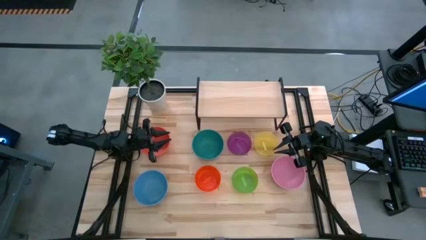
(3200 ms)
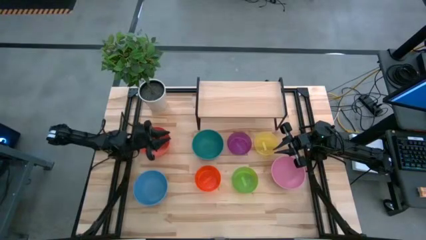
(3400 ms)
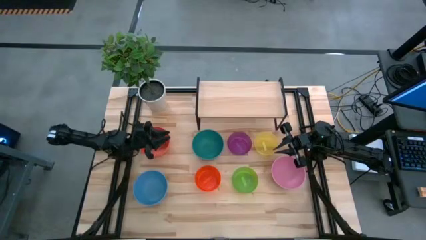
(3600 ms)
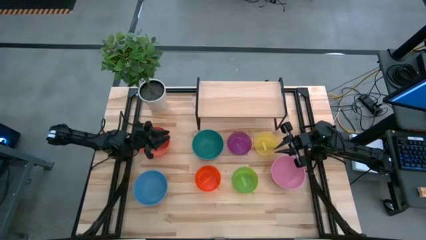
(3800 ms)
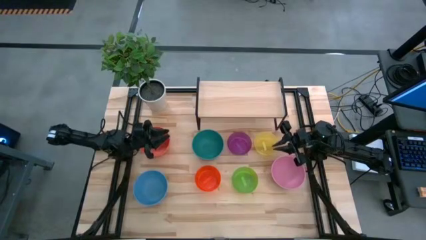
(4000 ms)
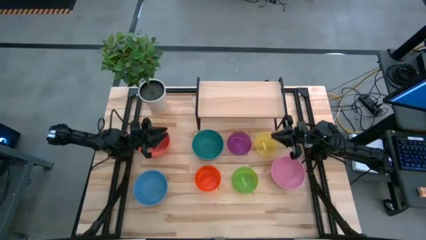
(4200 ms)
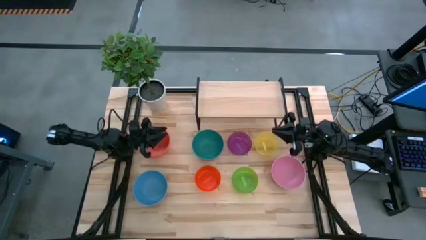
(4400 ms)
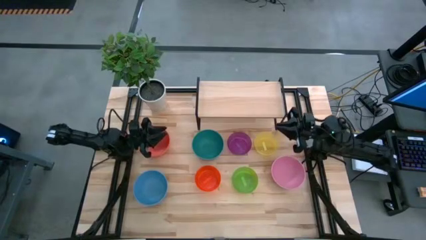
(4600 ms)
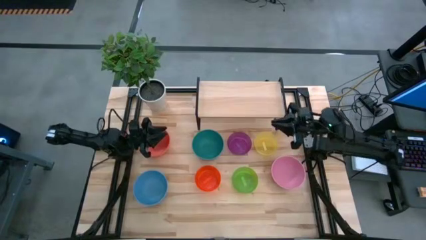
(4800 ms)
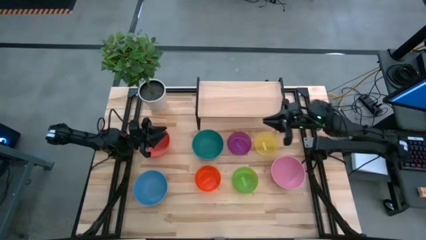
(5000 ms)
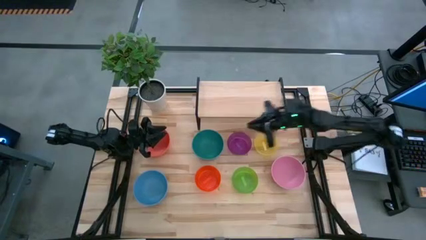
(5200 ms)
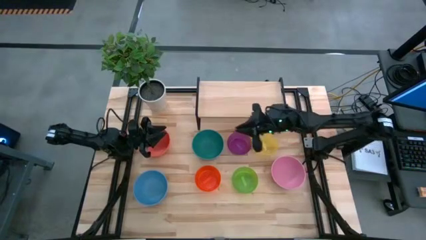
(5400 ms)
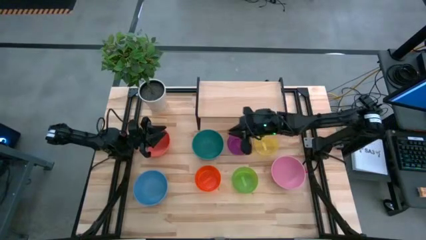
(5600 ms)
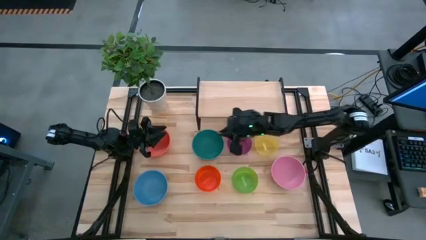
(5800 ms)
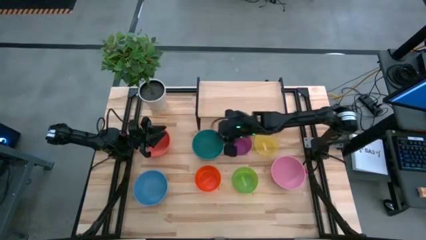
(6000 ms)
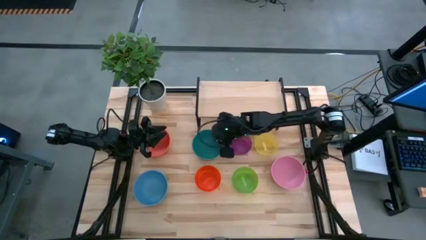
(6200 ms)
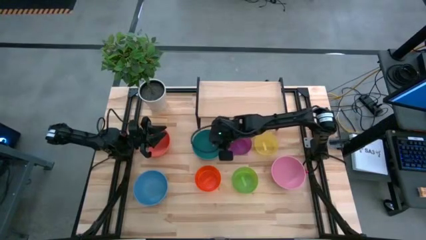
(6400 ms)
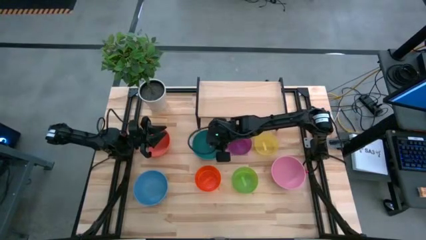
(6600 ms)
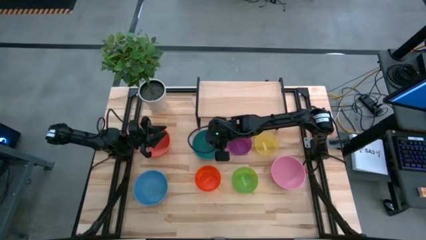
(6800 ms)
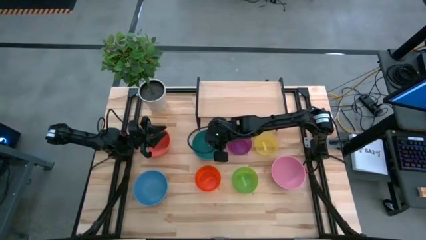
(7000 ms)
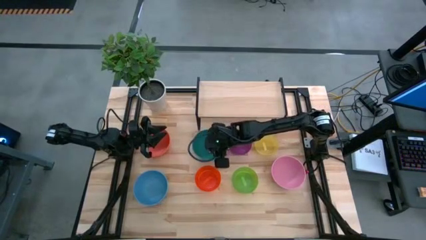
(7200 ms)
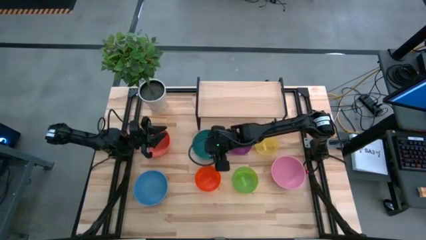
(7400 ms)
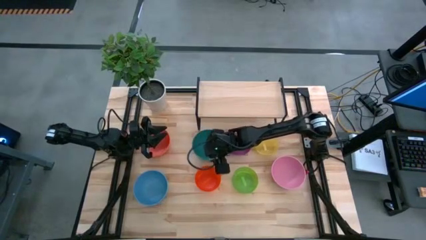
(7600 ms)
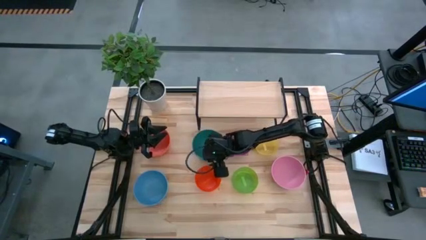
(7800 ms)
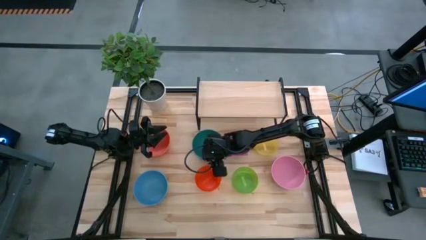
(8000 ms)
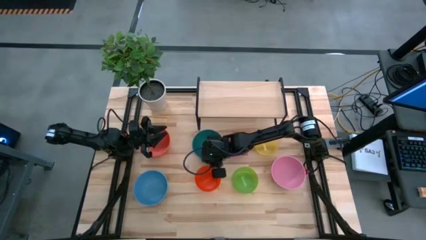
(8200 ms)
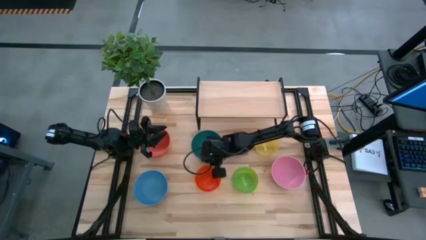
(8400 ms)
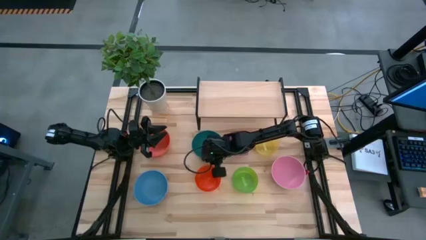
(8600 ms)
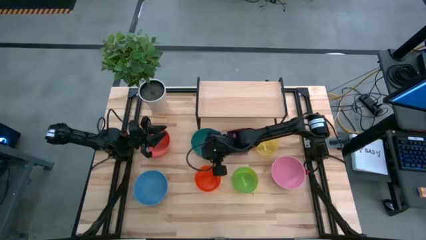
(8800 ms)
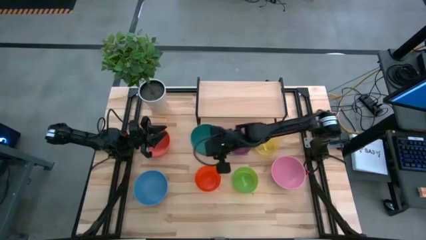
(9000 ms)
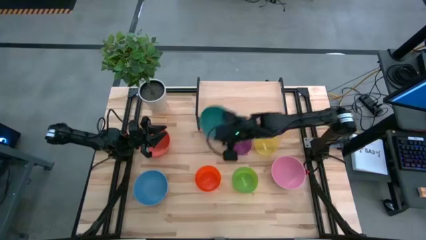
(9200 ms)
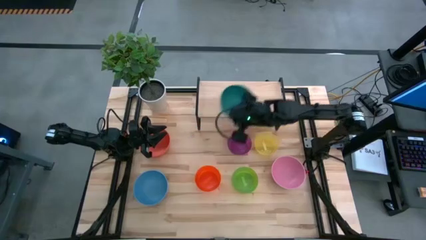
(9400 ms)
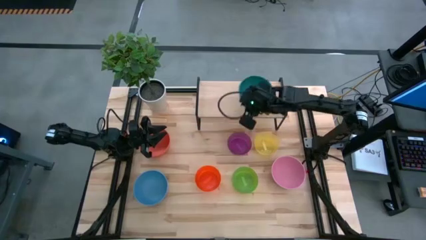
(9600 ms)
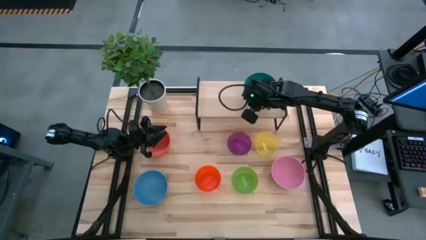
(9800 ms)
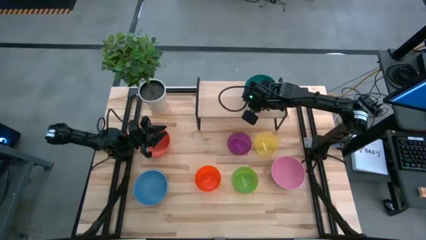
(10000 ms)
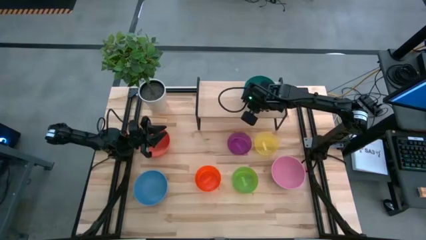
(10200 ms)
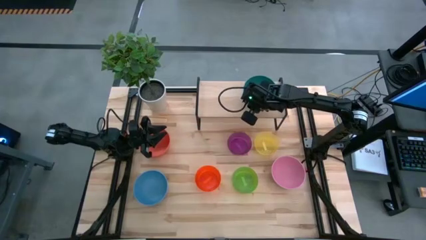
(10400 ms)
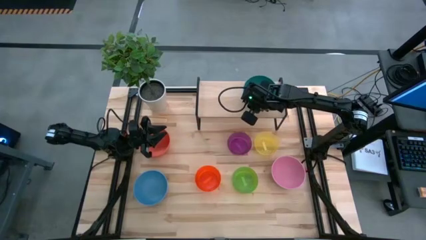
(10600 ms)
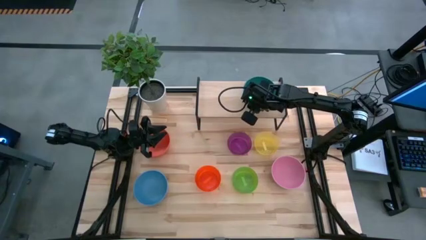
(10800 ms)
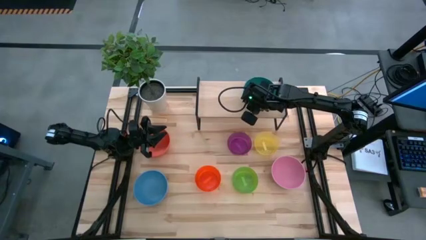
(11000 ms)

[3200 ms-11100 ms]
Task: Place and stack bowls onto a shelf
Put the large dark green bowl on the shelf

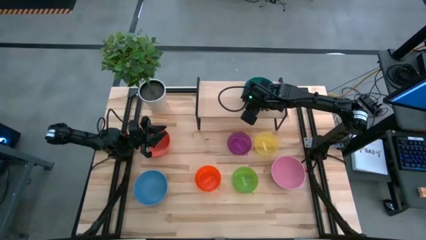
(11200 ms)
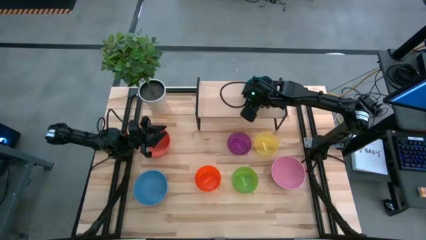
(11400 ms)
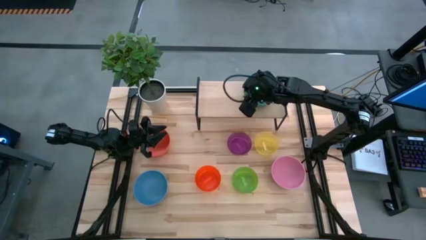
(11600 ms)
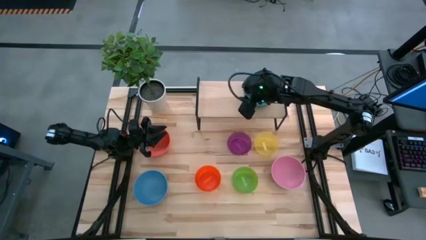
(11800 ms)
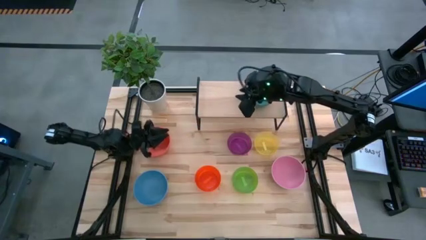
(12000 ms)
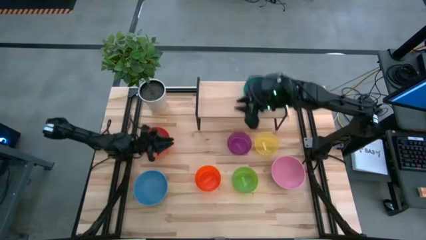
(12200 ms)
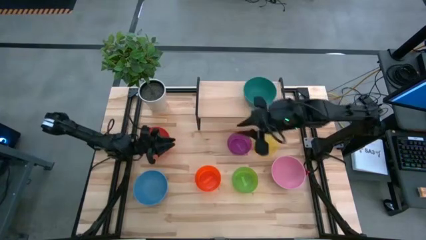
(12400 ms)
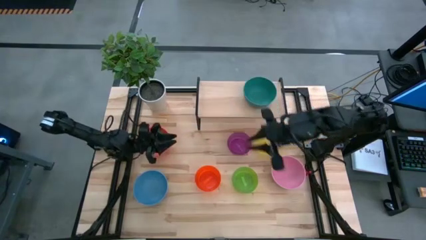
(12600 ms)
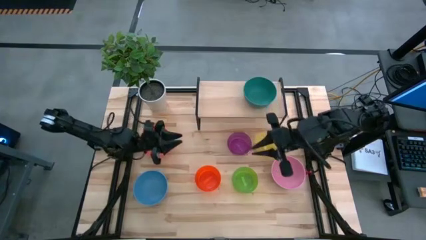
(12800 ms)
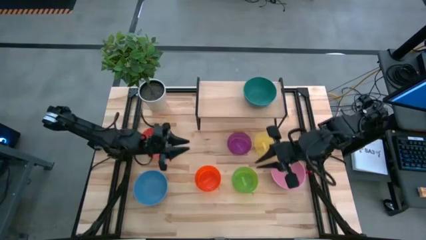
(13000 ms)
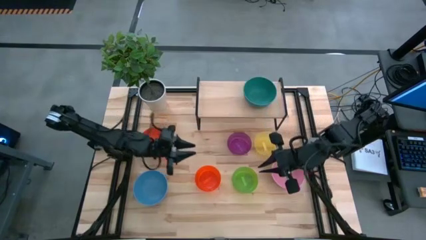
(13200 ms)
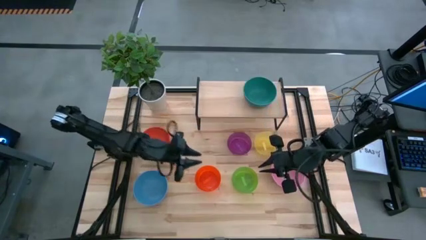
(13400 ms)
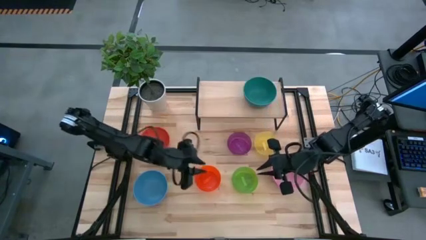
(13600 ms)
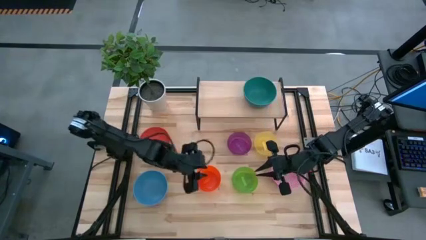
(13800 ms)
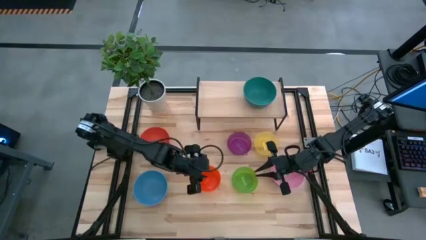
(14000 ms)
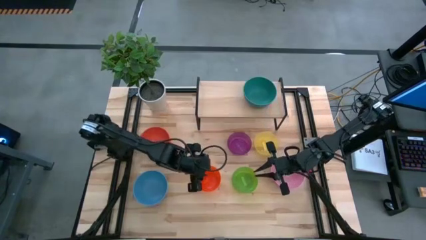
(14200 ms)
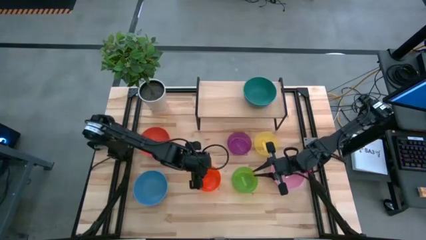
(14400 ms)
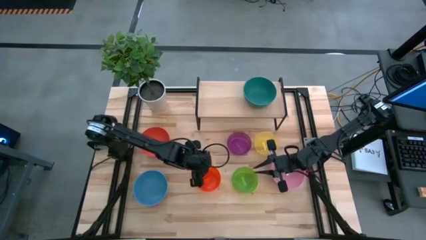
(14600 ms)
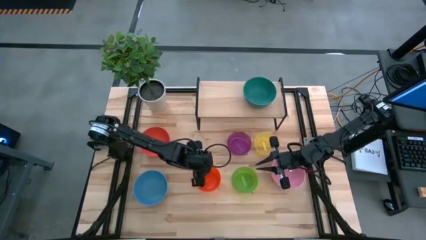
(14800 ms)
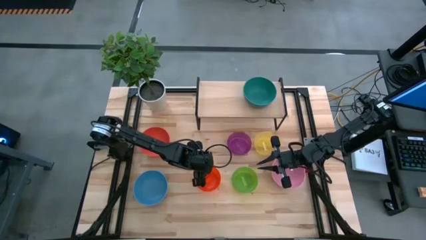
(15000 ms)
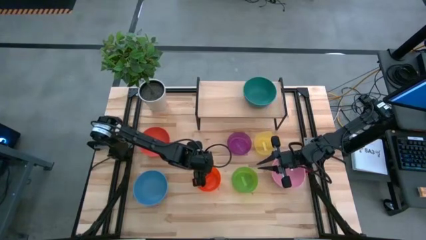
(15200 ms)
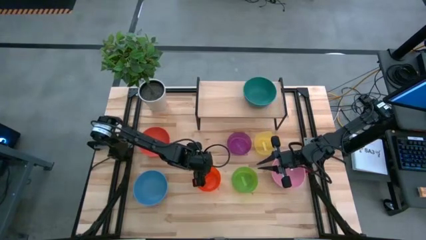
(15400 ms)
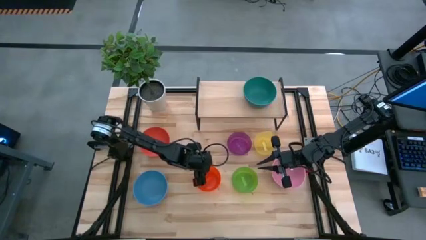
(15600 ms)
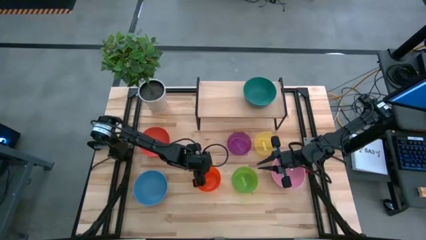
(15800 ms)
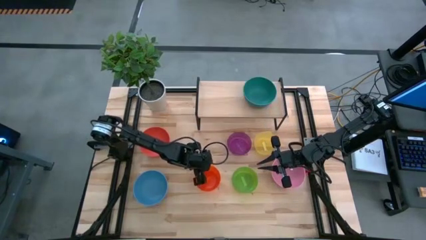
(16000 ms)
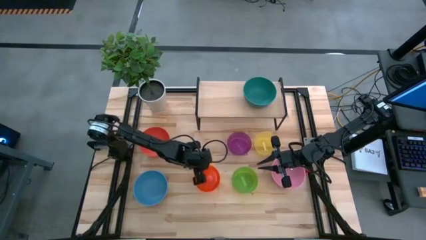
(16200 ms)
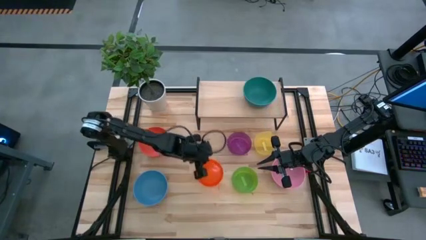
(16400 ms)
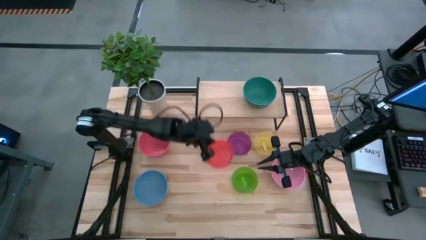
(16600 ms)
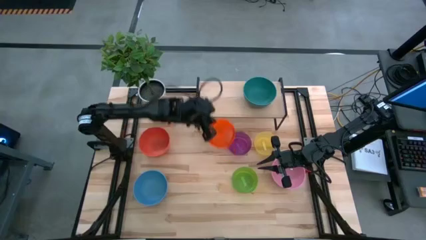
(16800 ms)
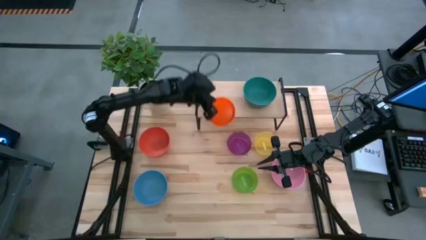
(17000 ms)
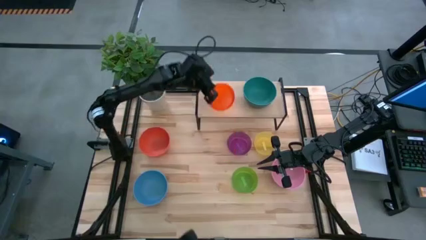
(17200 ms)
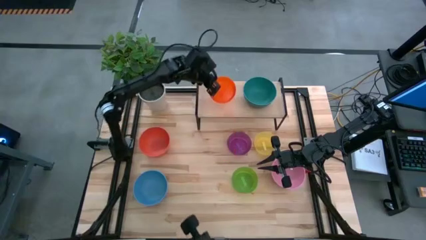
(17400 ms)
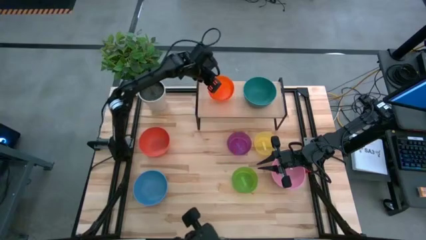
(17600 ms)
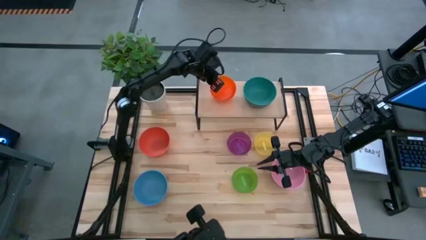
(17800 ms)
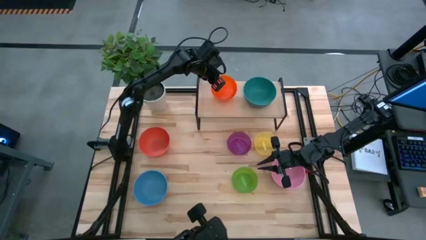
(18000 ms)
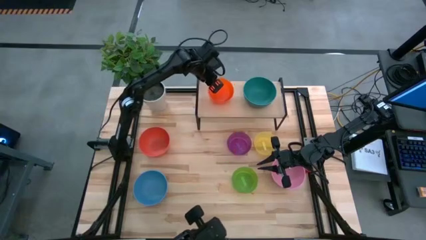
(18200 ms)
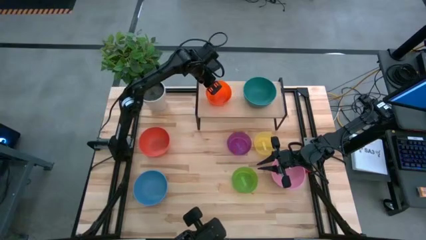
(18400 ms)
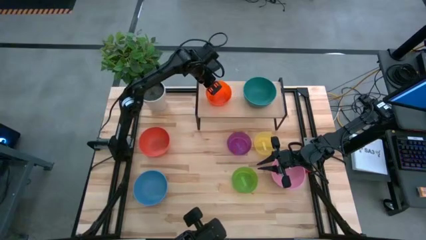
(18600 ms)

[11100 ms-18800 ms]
Put the small orange bowl on the shelf
